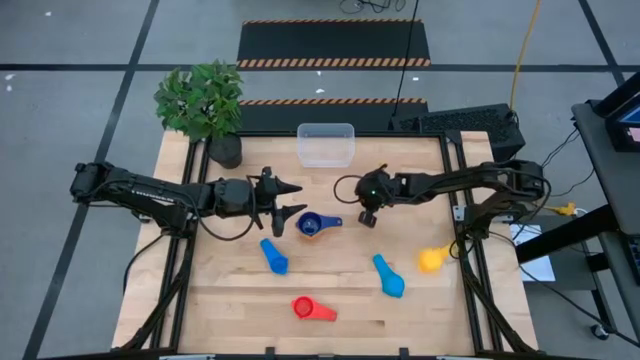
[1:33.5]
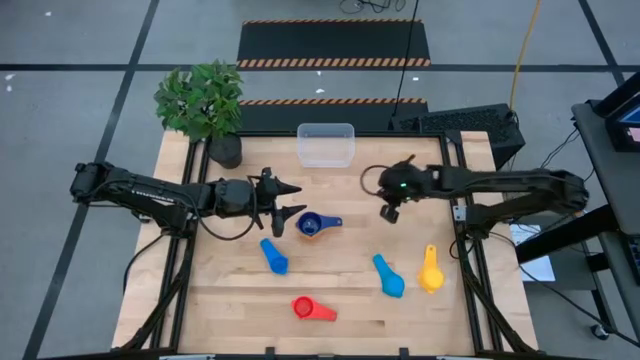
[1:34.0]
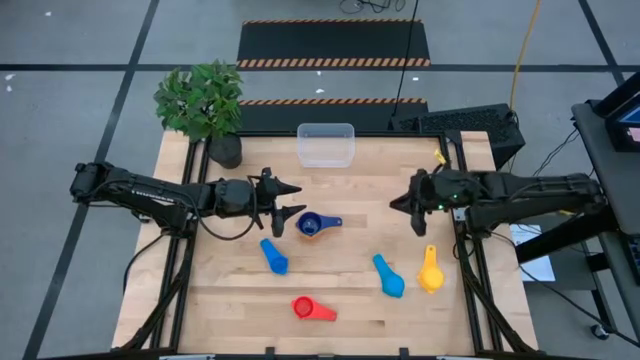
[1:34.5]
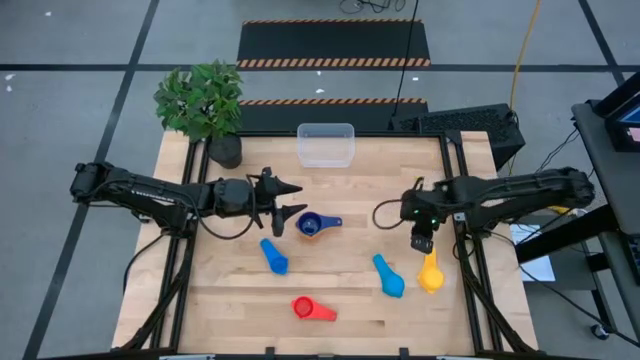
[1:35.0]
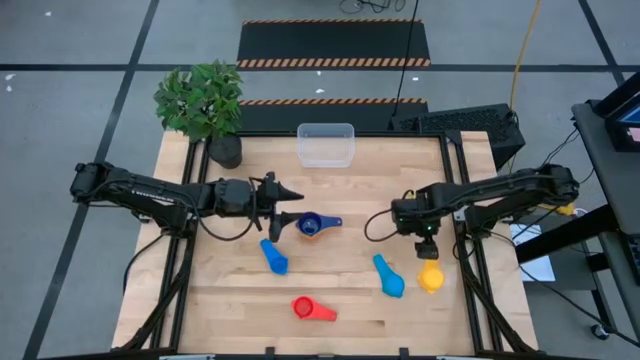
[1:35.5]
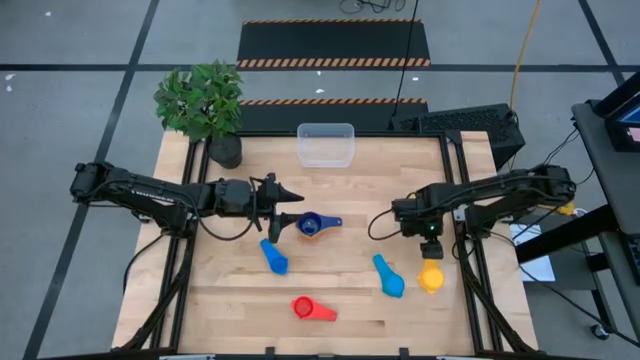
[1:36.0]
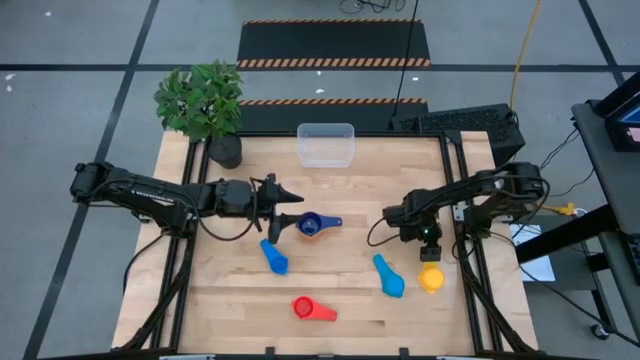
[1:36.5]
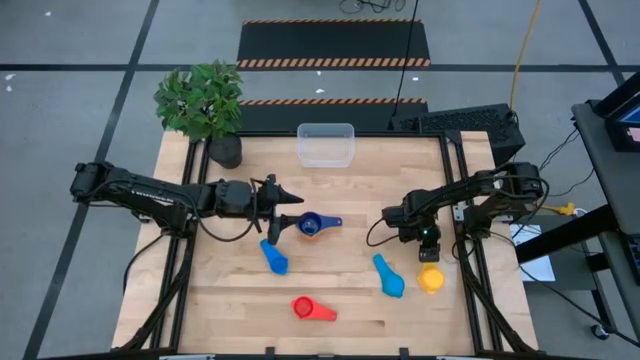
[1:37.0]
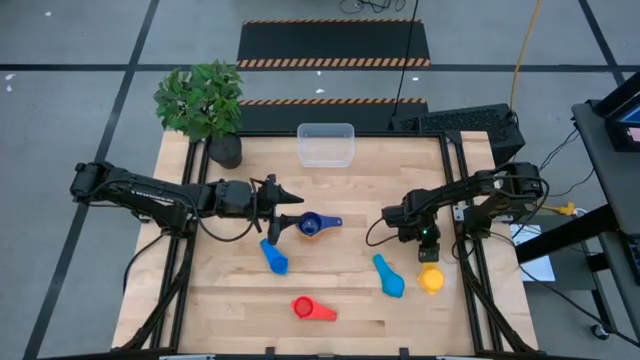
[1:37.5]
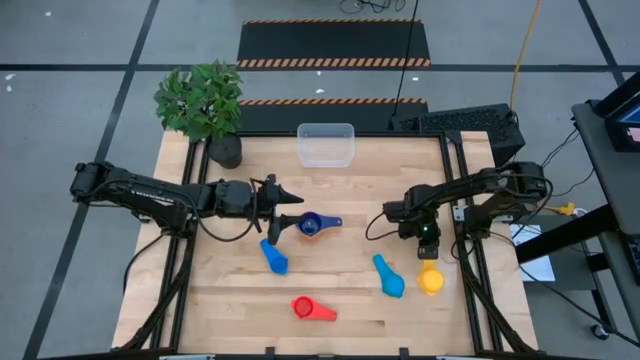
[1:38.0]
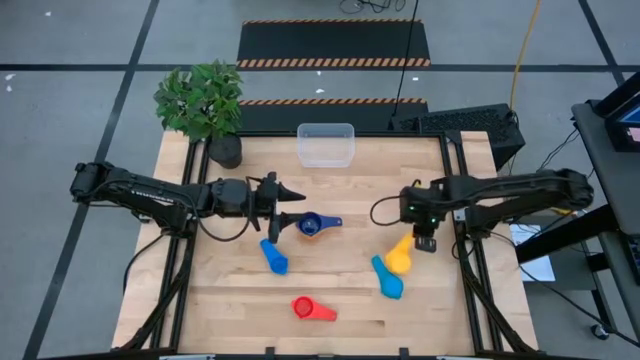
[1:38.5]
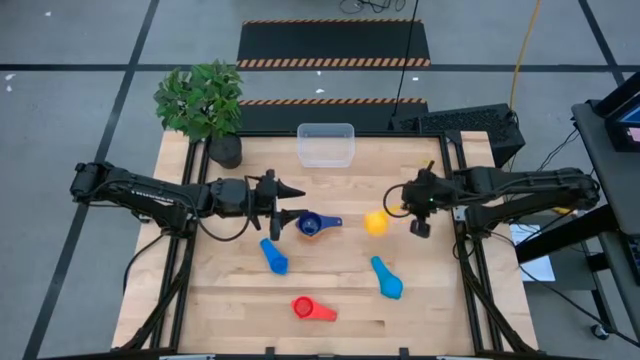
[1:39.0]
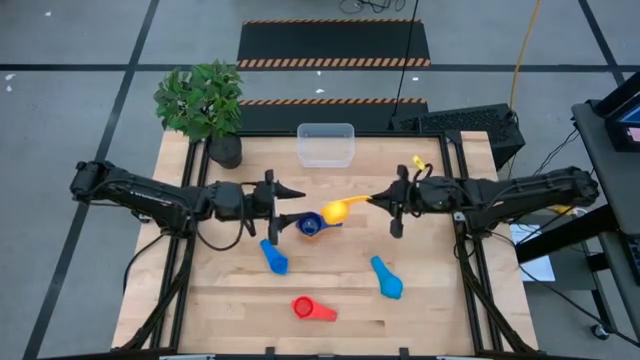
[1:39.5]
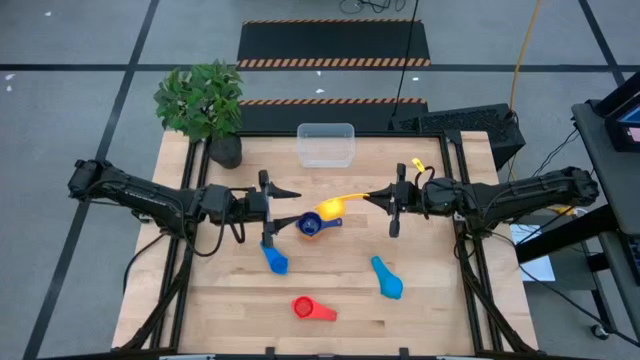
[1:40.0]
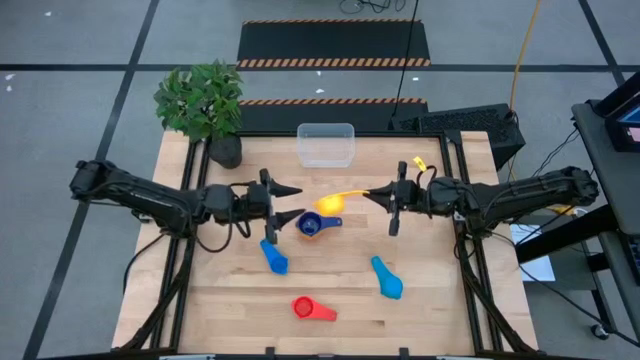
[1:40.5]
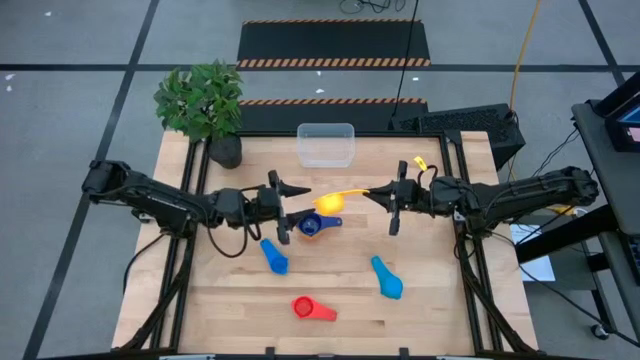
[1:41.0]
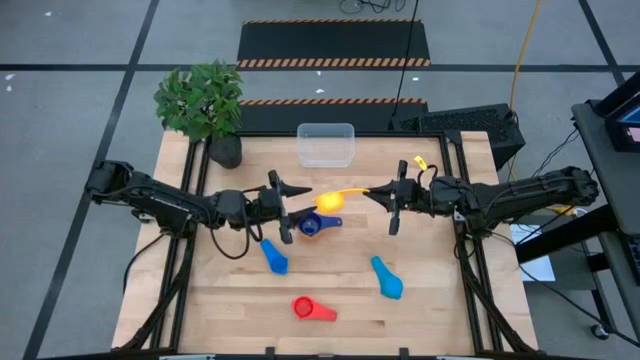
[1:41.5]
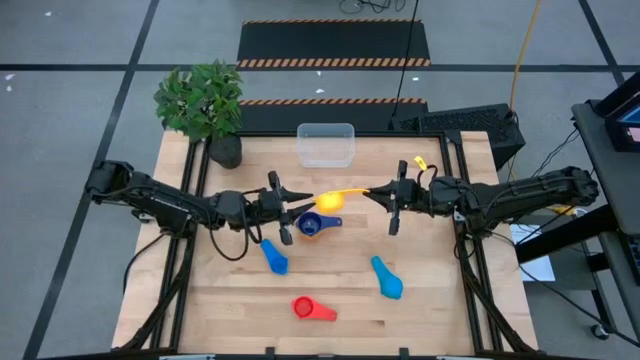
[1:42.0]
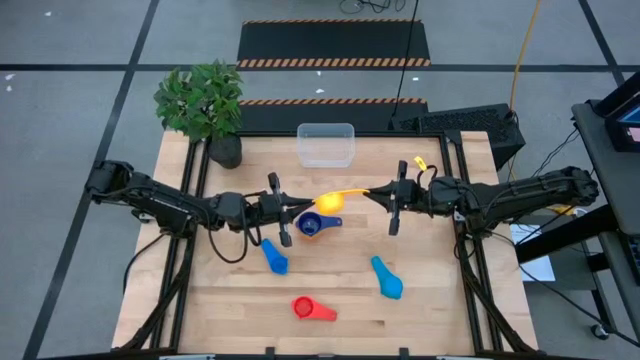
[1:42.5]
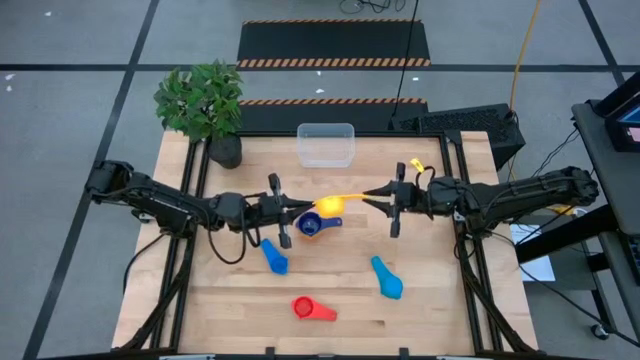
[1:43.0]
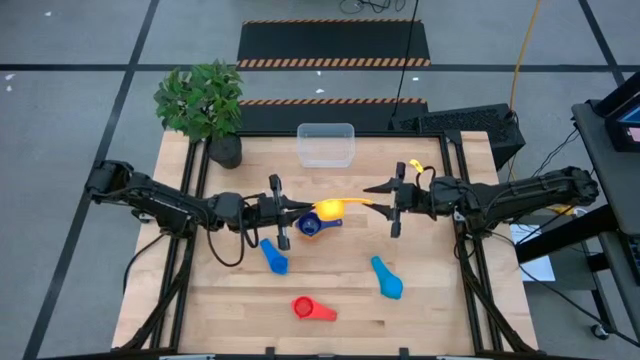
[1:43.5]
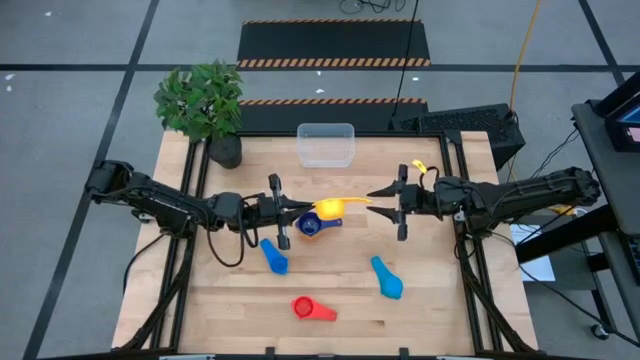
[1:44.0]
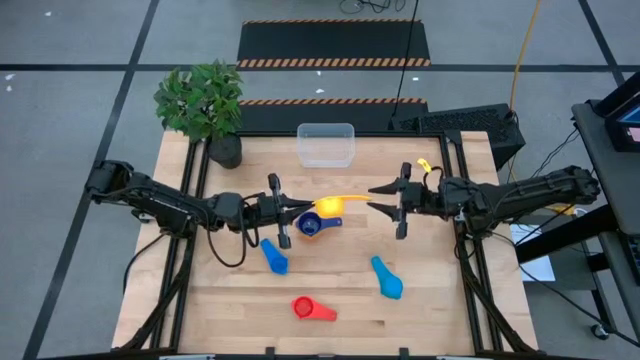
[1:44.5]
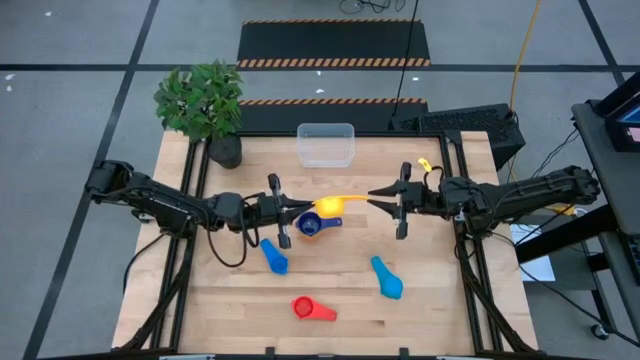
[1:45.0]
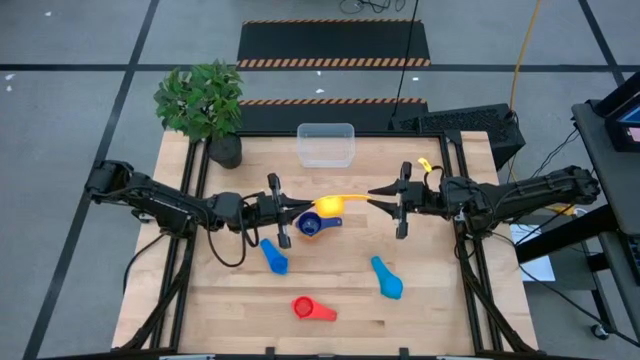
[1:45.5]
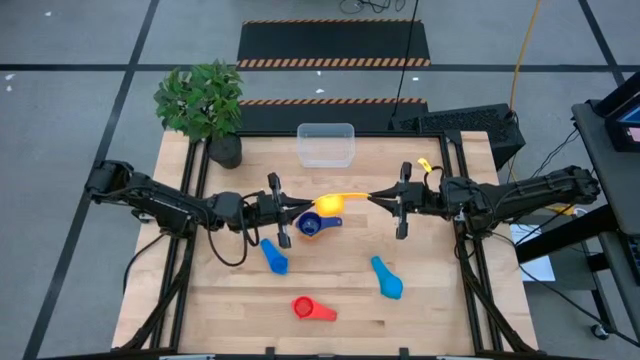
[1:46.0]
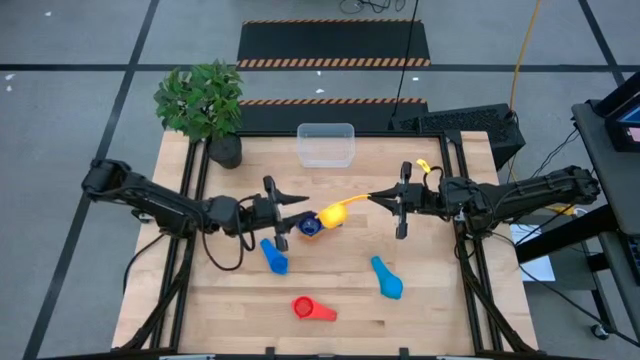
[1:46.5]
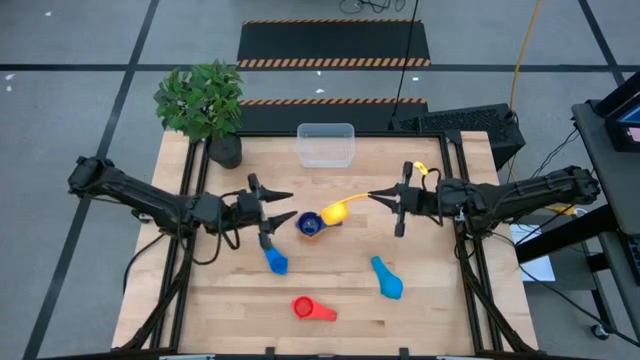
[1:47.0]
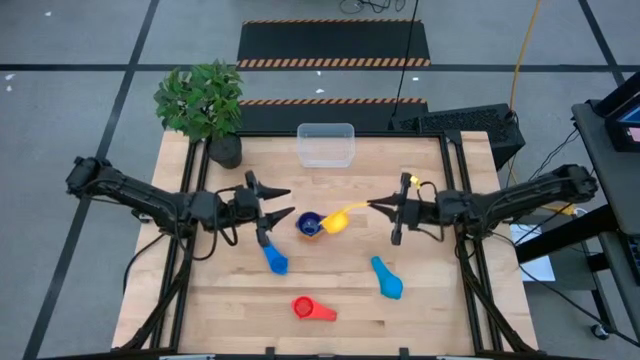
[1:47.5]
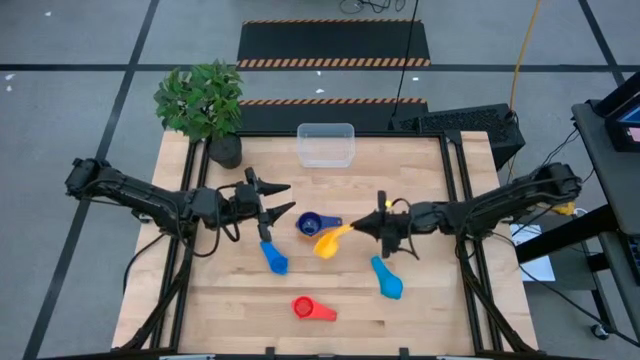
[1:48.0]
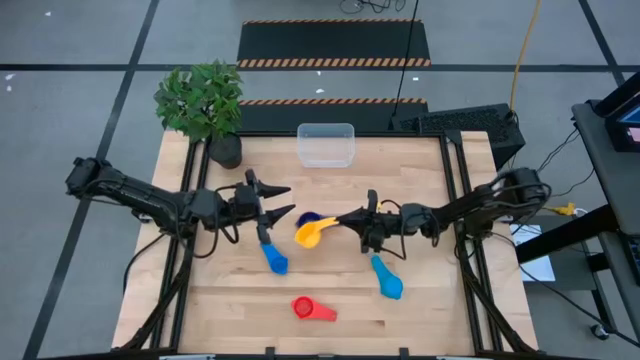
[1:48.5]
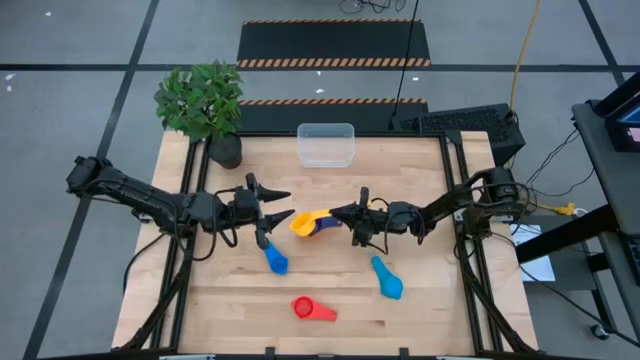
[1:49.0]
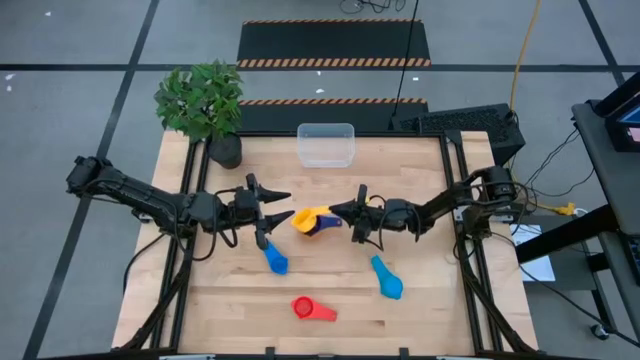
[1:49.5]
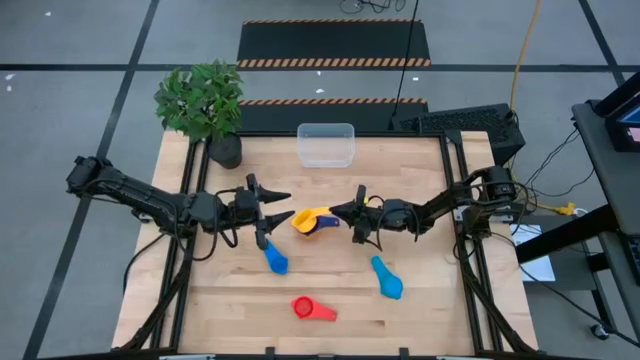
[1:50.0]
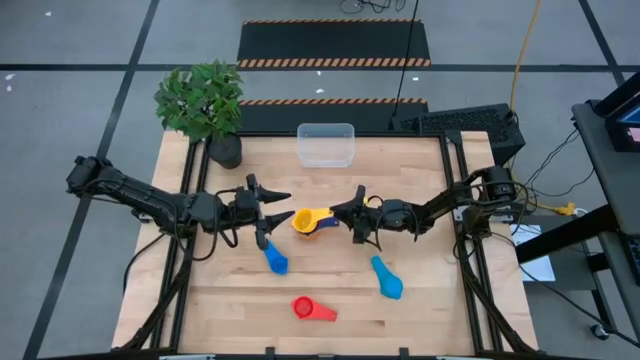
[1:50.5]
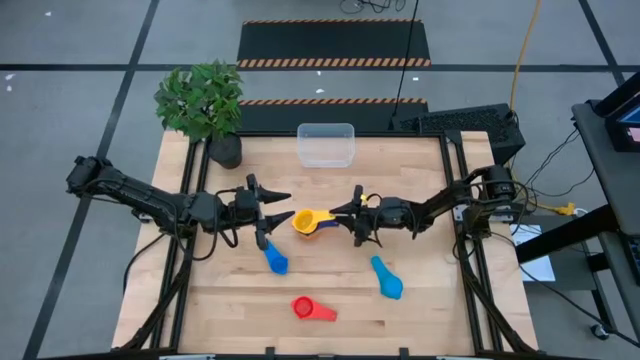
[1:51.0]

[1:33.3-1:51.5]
Task: Nest measuring cups in basket
Stack the yellow measuring cup on top of the dark blue measuring cup

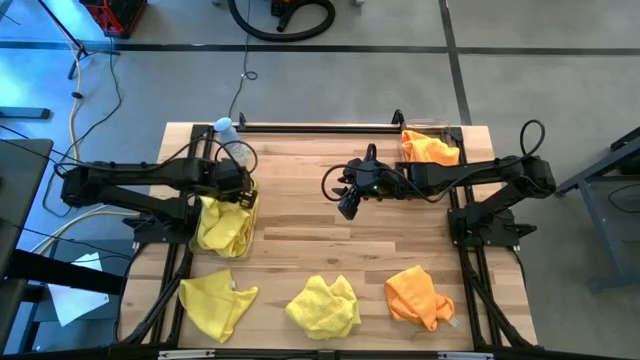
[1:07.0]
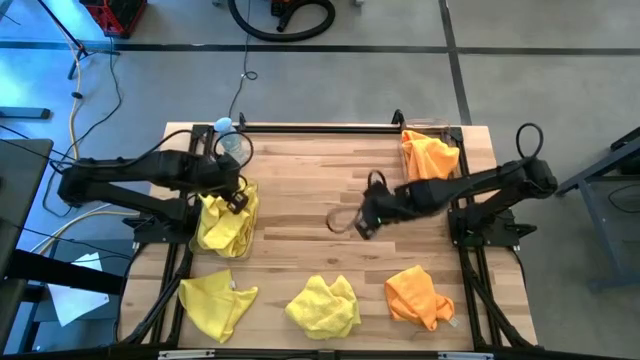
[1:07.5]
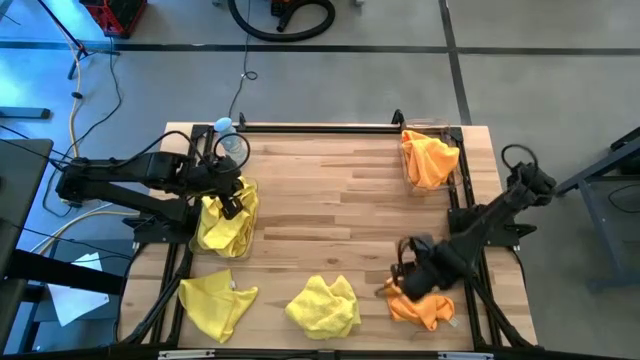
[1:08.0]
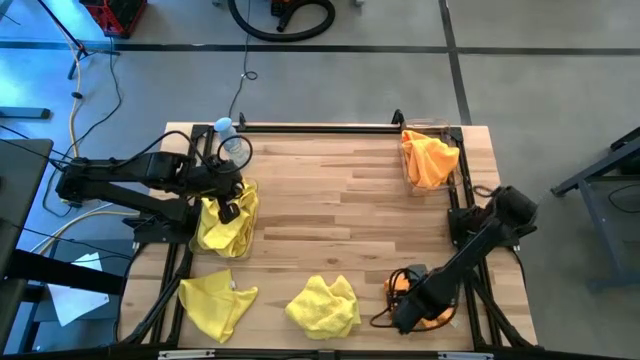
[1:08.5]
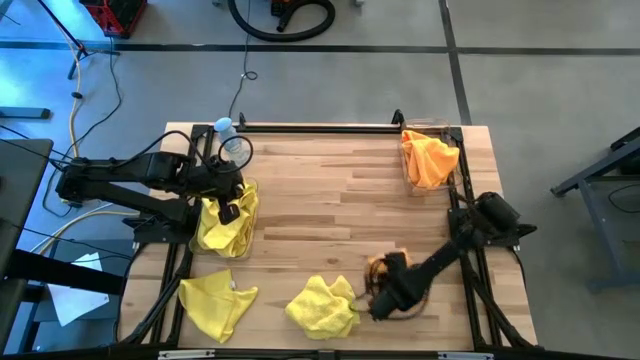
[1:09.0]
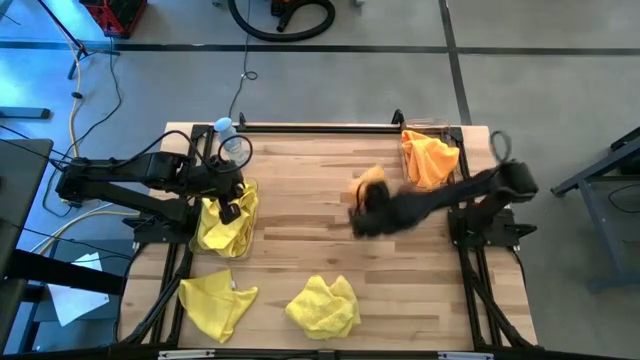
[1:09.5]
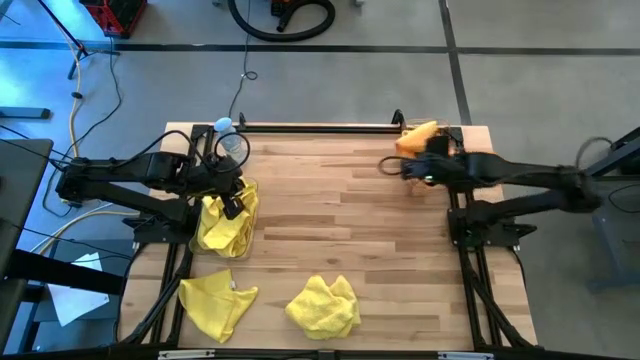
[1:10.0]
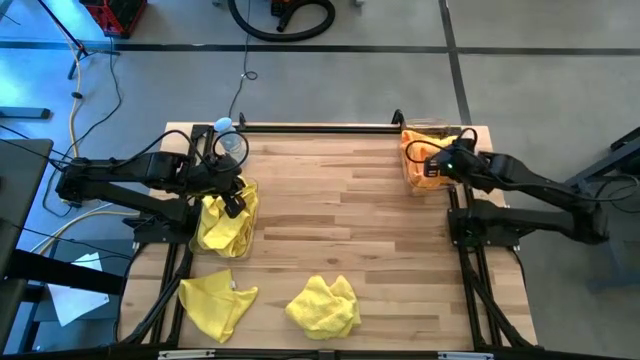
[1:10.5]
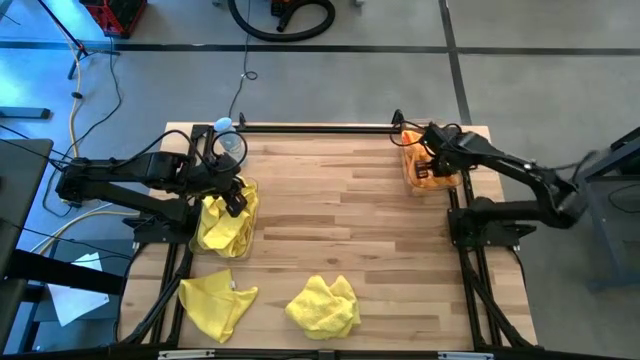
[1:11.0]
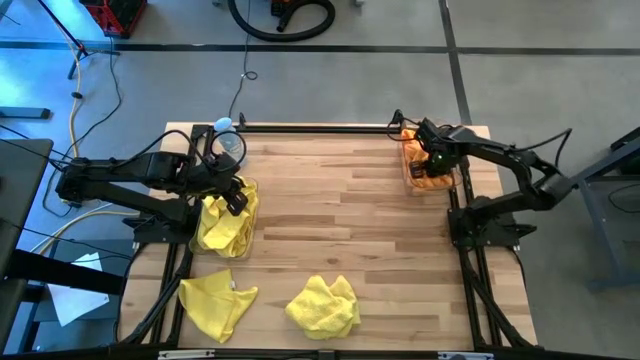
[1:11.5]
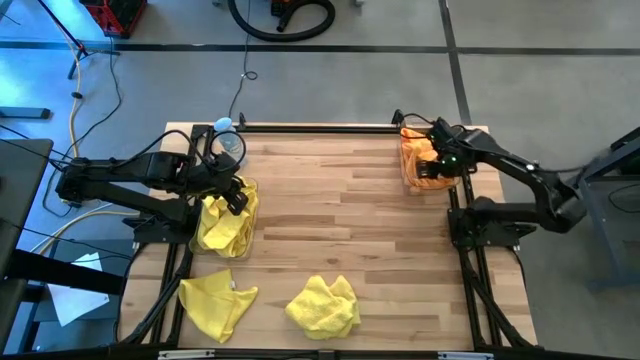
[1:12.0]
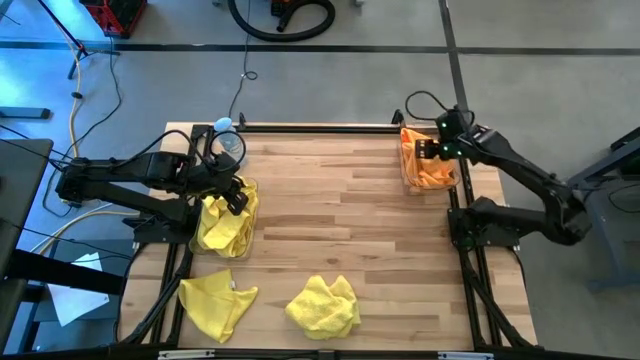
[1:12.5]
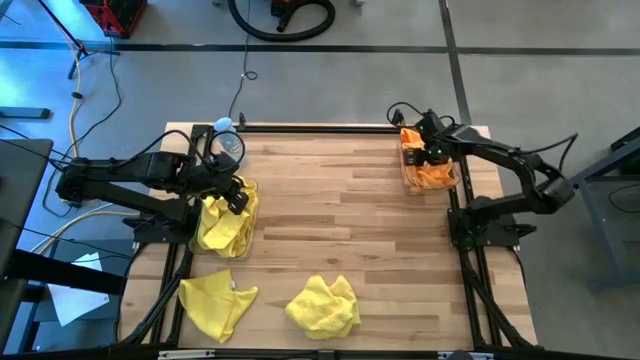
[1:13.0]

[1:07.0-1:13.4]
Task: Sort microfiber towel by color & place in baskets
Put the orange microfiber cloth into the right transparent bin
